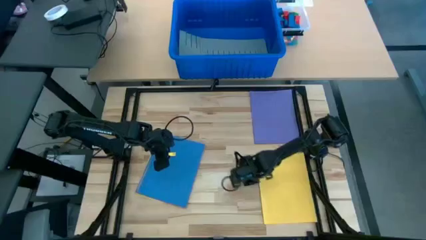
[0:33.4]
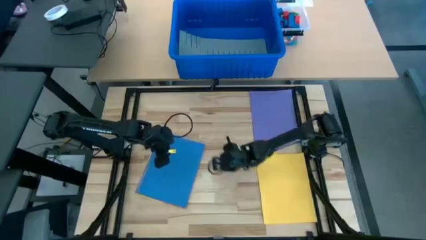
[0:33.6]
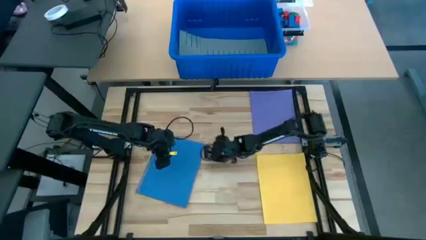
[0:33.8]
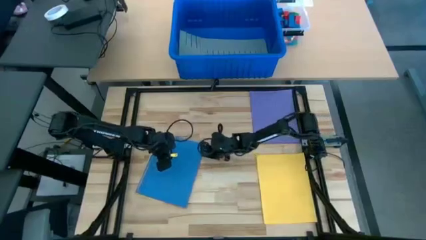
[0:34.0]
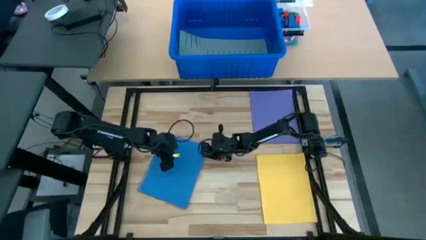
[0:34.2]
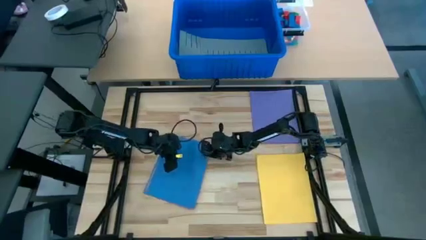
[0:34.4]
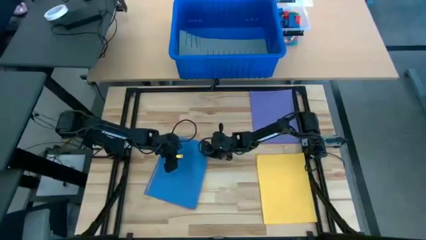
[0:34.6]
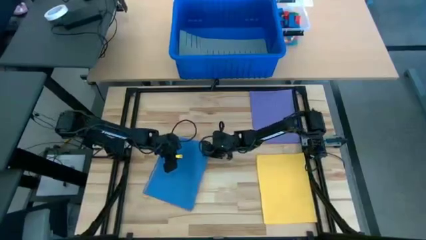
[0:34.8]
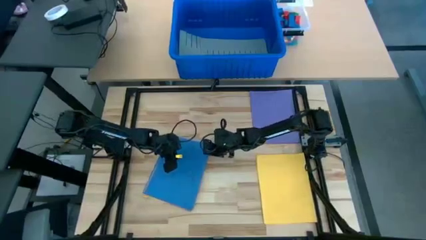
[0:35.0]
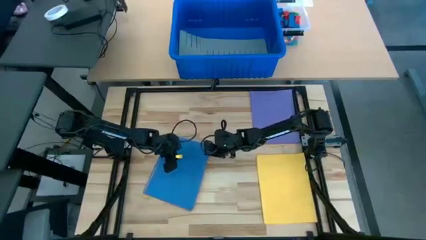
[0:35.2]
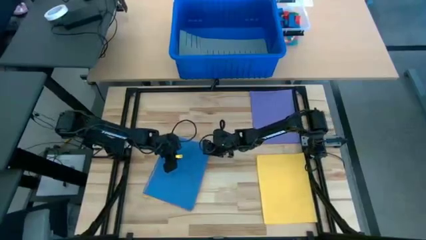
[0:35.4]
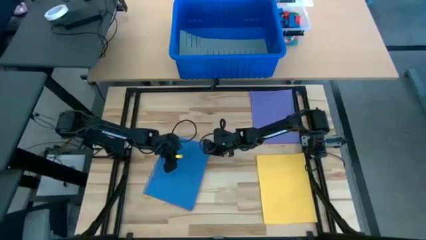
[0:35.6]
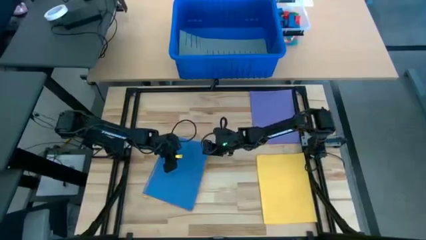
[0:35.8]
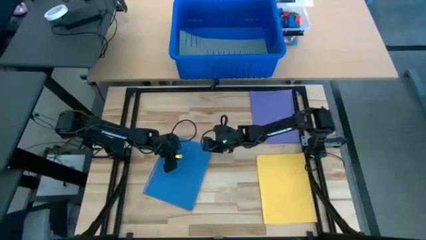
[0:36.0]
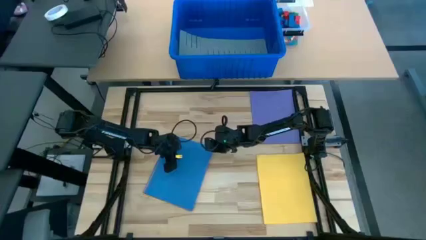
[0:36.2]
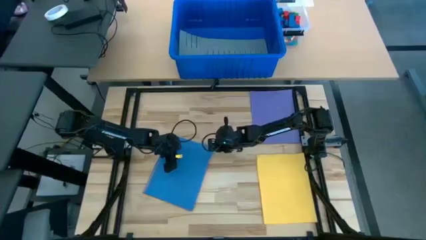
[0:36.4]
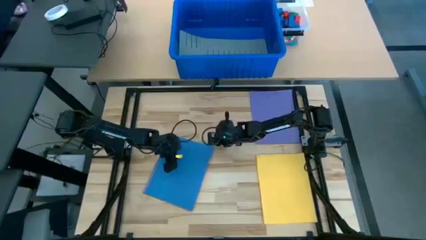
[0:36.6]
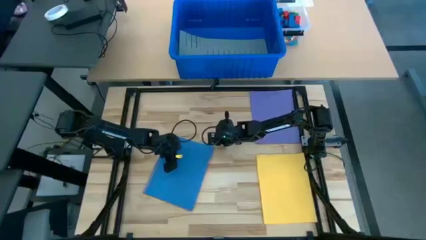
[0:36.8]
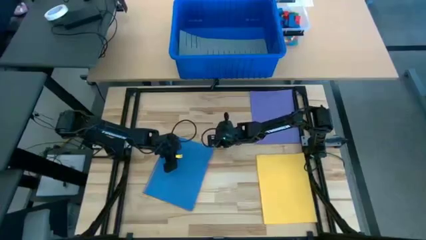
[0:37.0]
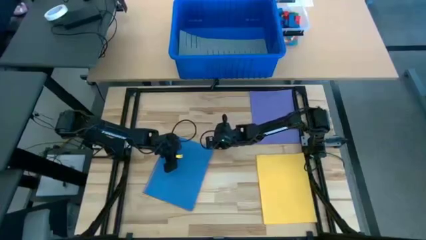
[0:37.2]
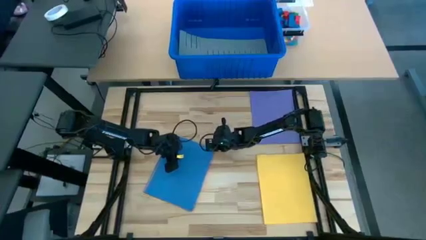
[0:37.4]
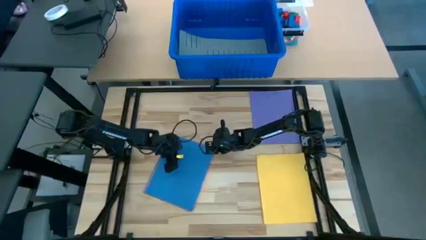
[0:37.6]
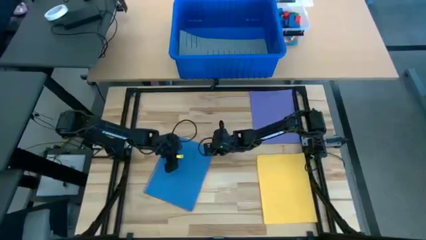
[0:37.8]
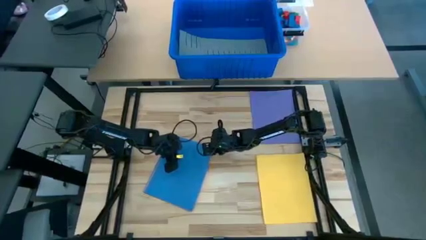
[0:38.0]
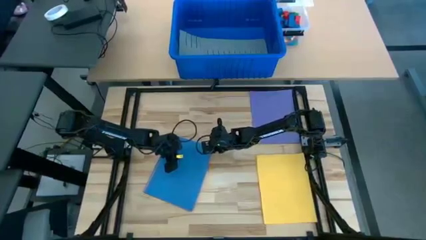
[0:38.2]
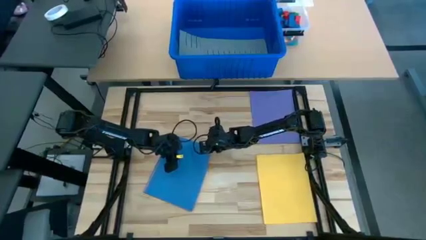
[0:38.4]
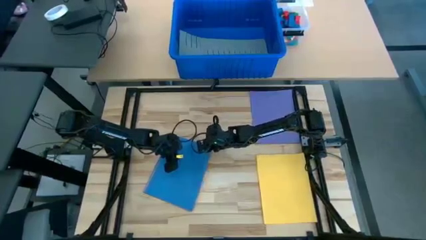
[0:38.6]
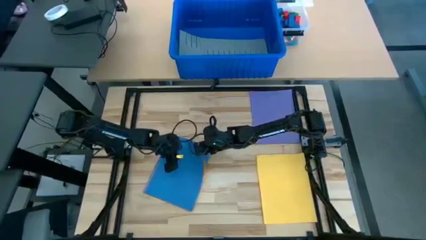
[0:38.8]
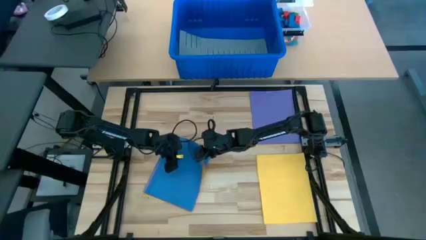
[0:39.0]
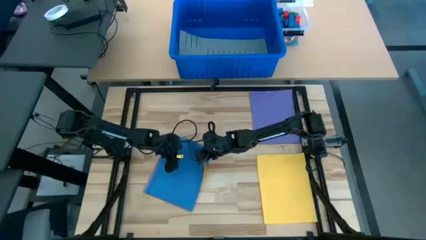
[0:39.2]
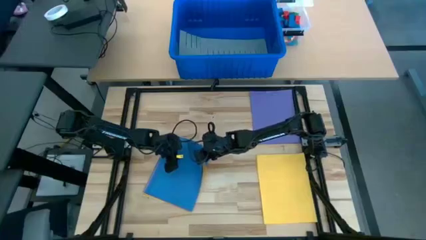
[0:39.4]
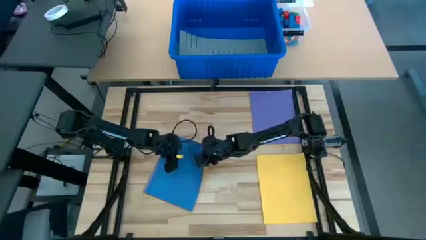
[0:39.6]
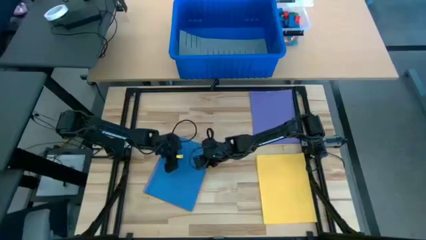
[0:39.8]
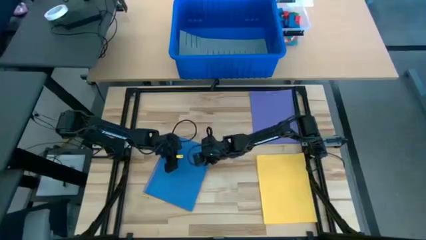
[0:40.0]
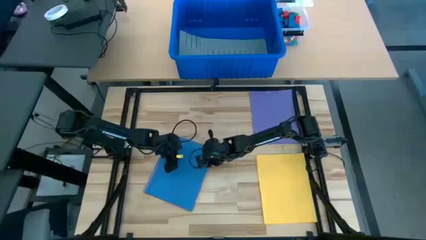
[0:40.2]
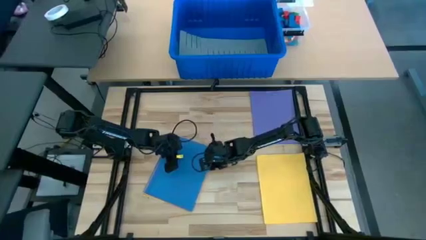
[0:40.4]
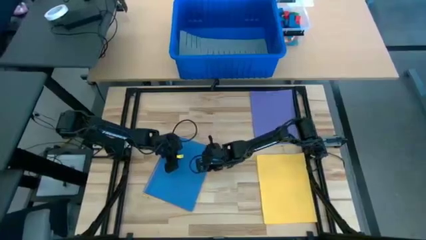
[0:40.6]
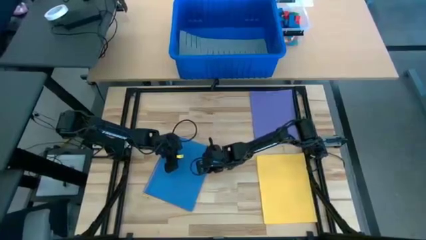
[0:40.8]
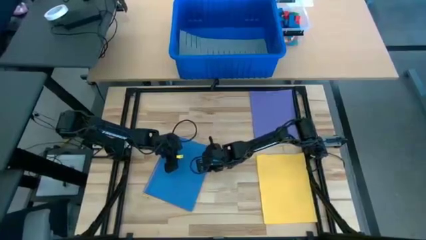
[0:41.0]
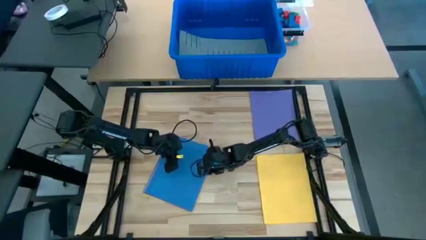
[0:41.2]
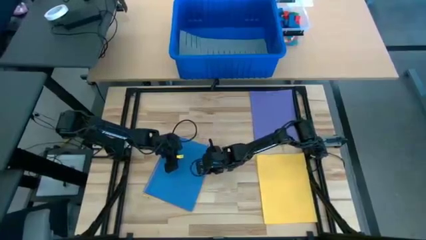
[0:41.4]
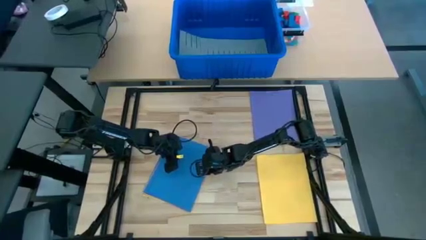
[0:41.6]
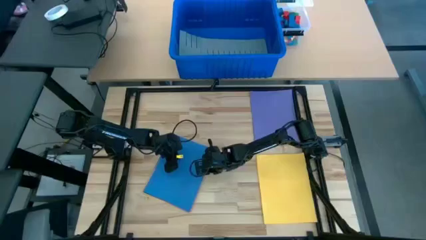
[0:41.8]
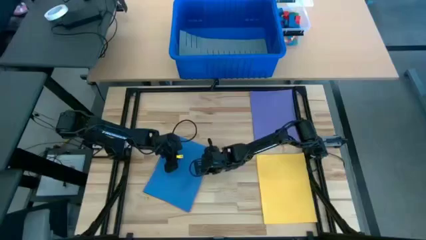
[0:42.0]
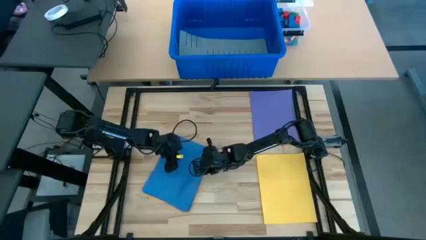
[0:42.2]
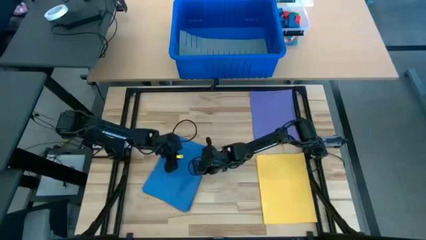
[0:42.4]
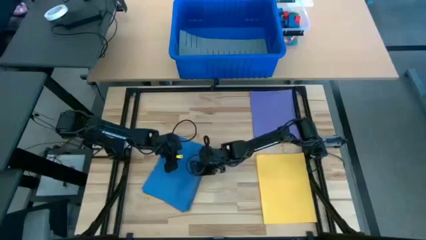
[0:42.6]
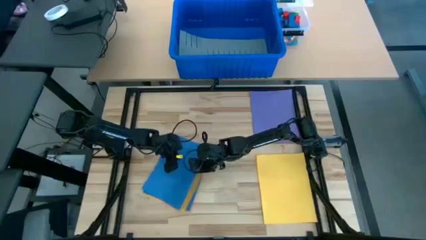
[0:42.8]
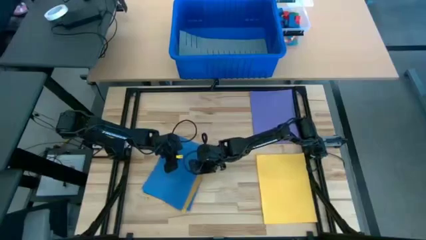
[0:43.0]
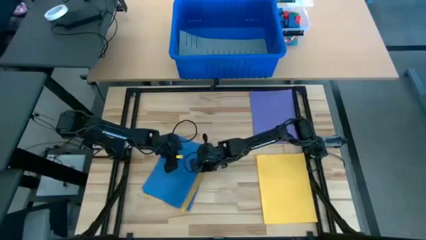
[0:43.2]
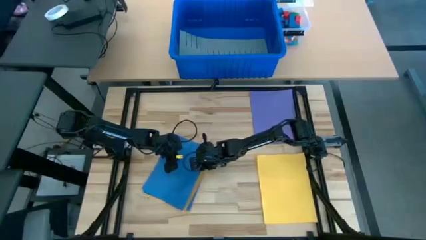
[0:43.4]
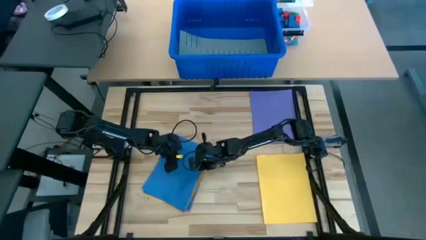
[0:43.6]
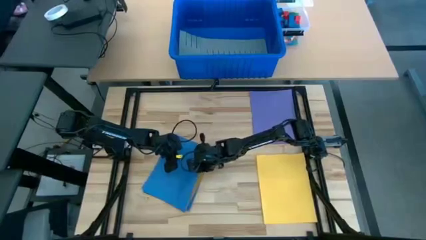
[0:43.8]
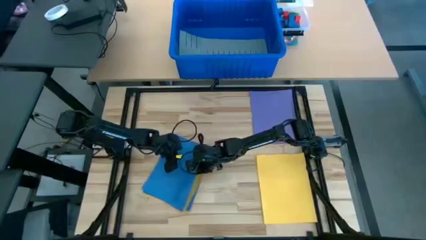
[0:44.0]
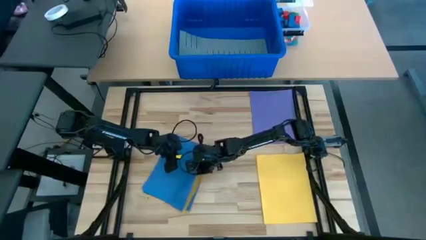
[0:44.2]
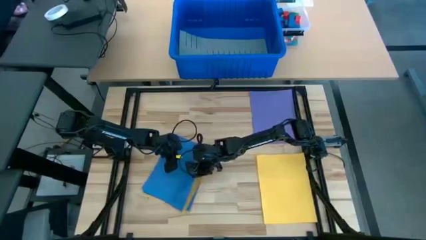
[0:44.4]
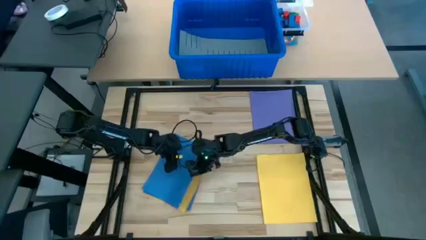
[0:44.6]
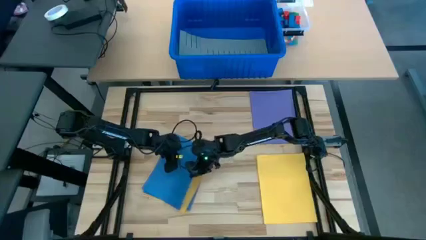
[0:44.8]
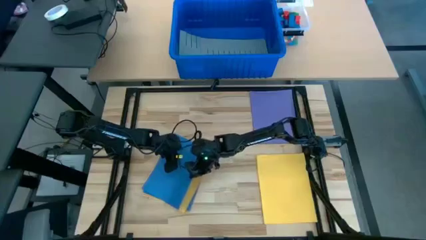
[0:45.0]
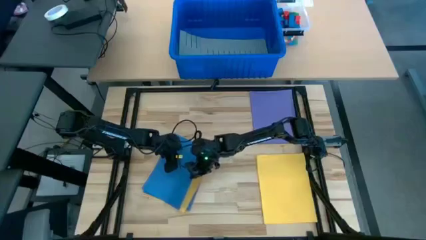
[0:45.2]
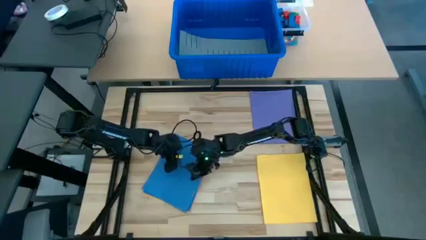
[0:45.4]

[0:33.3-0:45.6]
Task: Organize paper
Put the blue paper on the table
